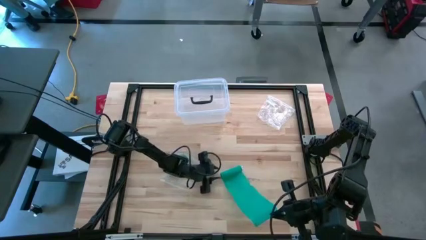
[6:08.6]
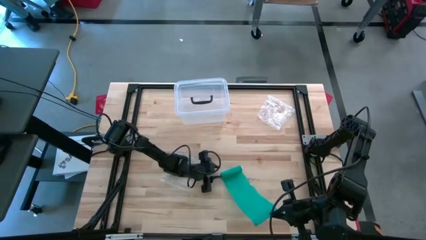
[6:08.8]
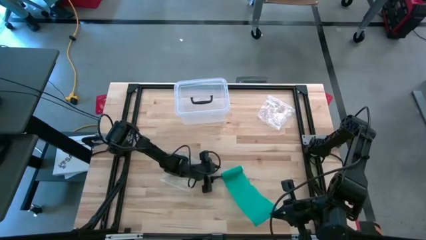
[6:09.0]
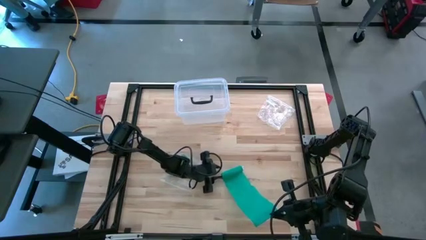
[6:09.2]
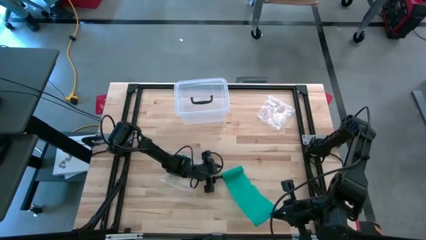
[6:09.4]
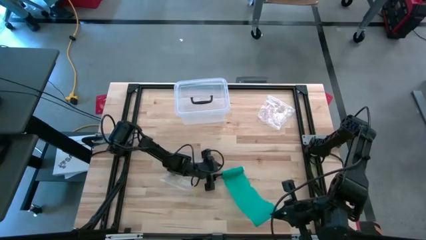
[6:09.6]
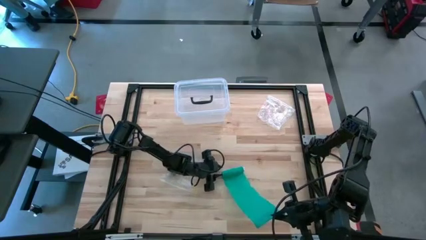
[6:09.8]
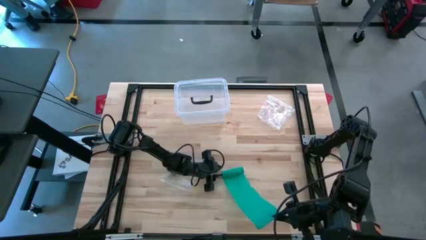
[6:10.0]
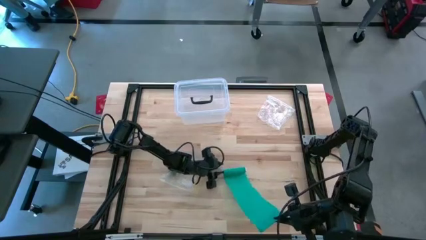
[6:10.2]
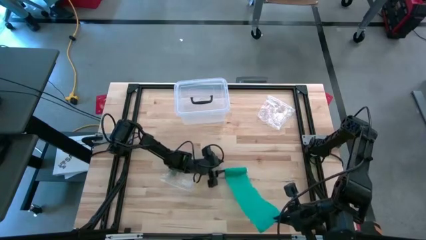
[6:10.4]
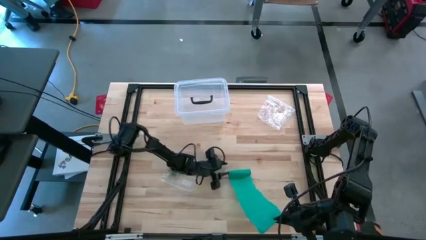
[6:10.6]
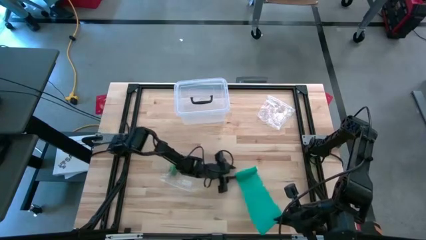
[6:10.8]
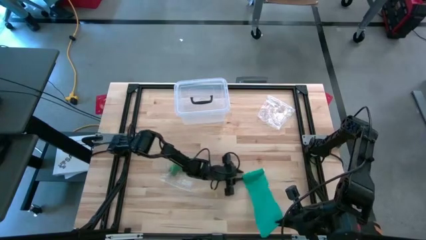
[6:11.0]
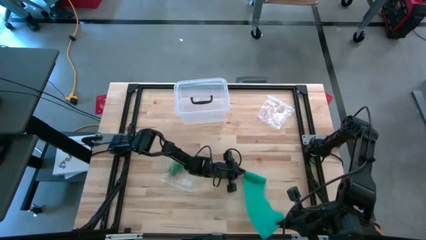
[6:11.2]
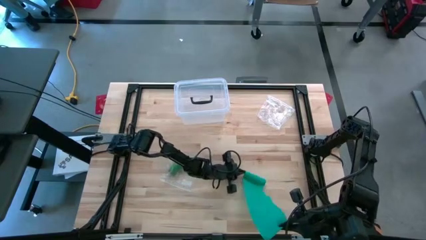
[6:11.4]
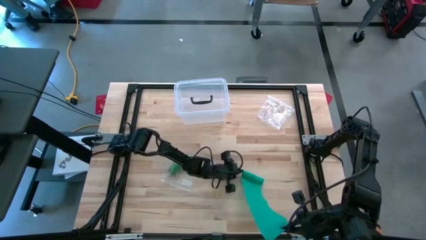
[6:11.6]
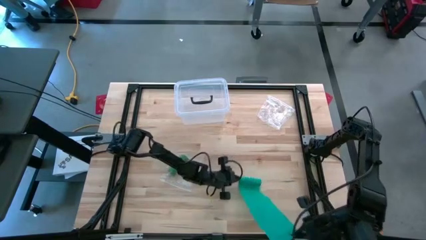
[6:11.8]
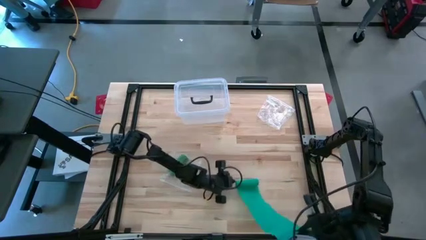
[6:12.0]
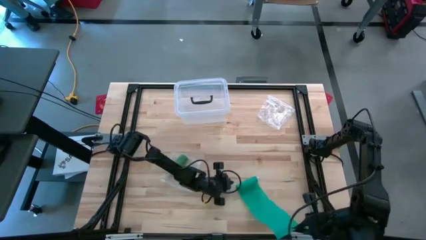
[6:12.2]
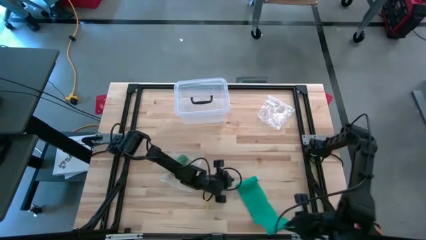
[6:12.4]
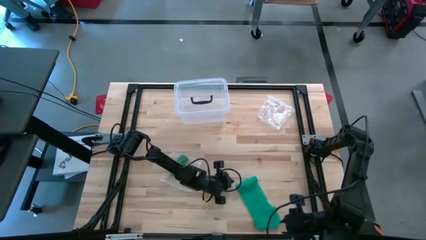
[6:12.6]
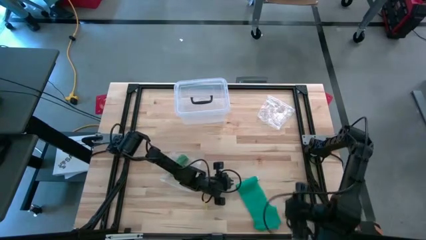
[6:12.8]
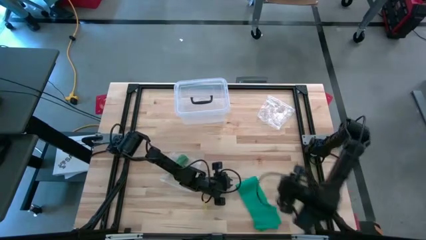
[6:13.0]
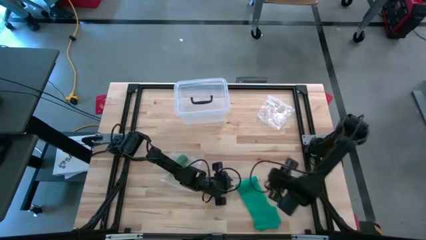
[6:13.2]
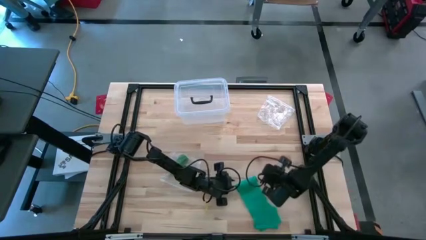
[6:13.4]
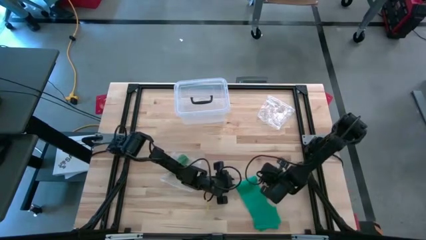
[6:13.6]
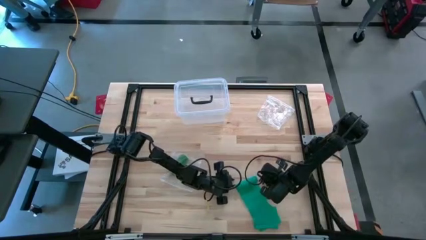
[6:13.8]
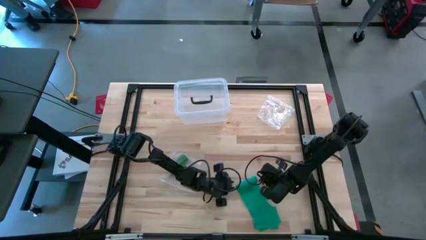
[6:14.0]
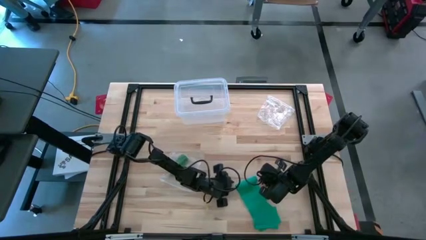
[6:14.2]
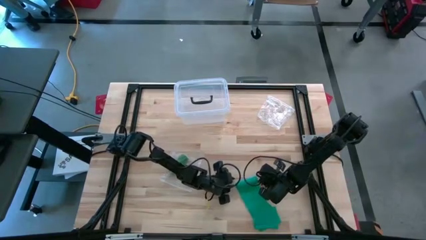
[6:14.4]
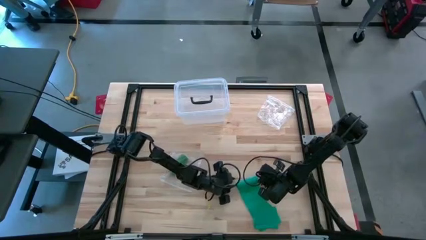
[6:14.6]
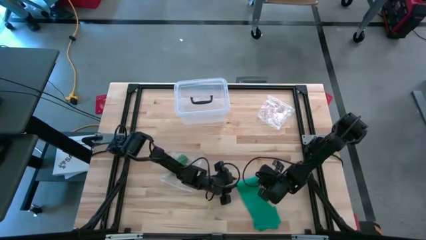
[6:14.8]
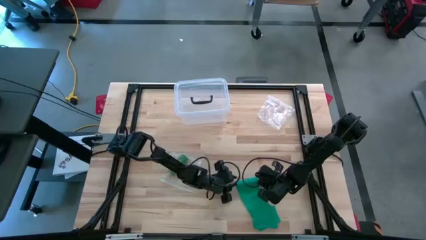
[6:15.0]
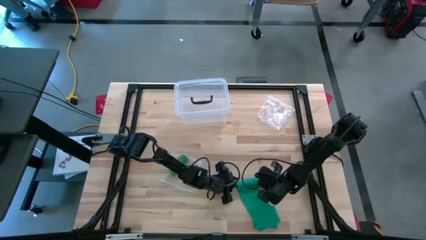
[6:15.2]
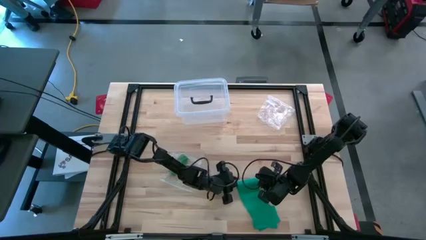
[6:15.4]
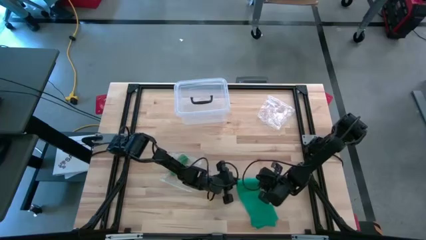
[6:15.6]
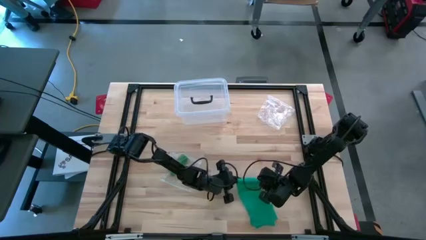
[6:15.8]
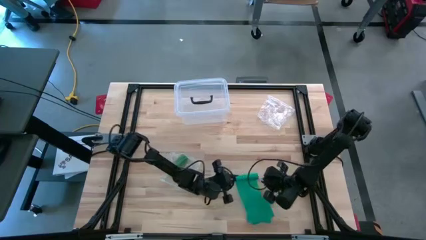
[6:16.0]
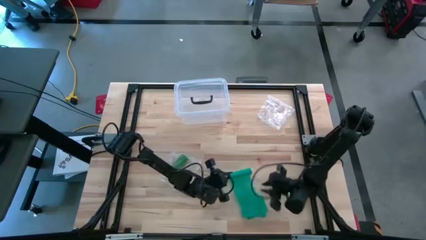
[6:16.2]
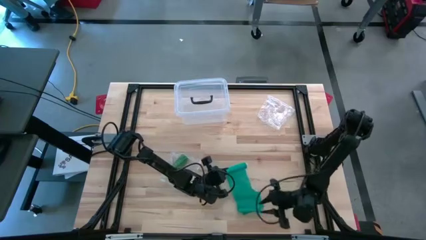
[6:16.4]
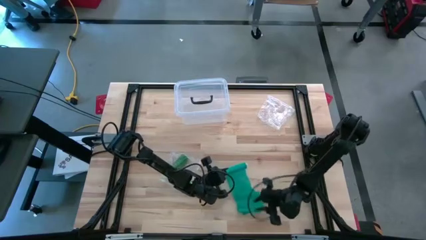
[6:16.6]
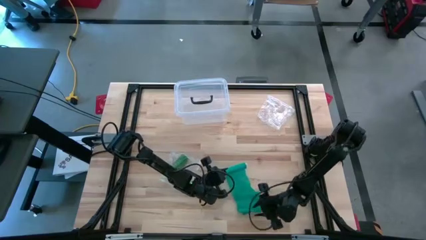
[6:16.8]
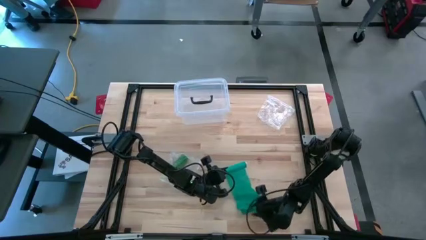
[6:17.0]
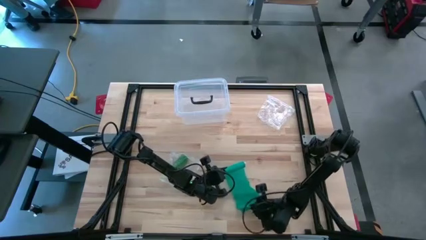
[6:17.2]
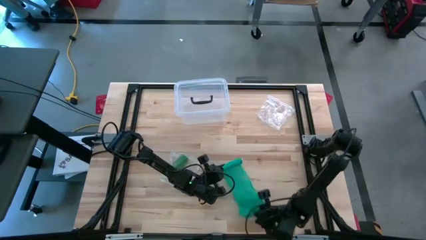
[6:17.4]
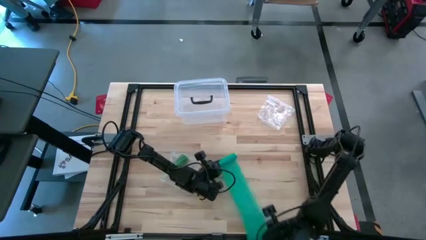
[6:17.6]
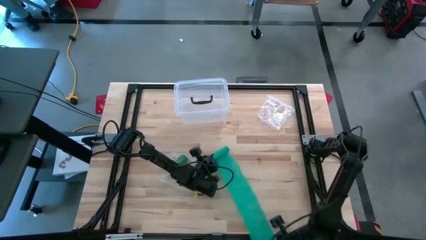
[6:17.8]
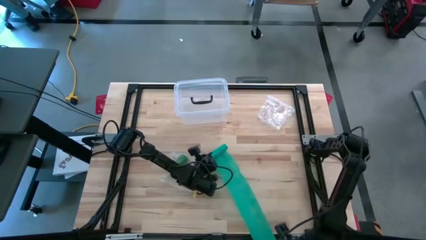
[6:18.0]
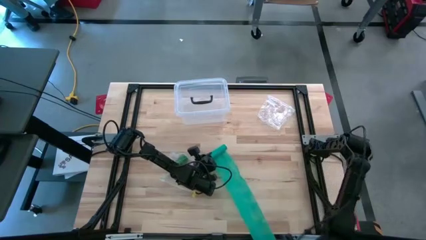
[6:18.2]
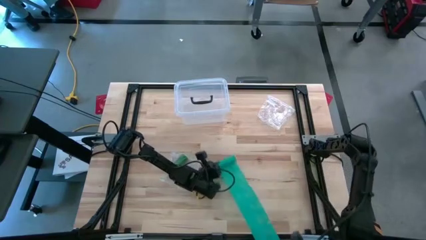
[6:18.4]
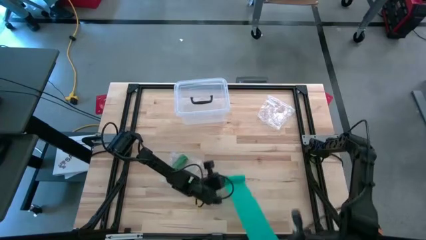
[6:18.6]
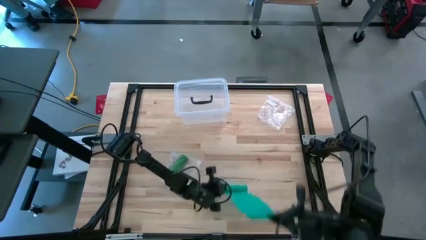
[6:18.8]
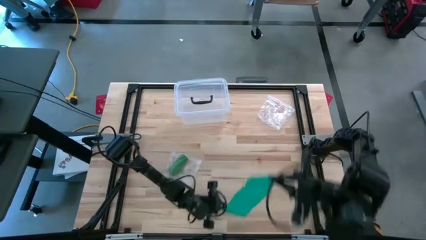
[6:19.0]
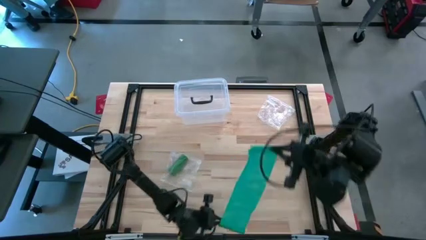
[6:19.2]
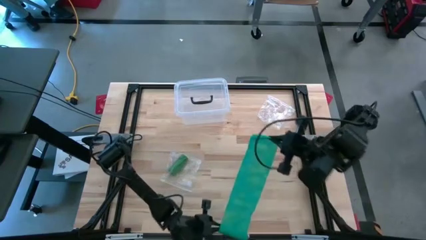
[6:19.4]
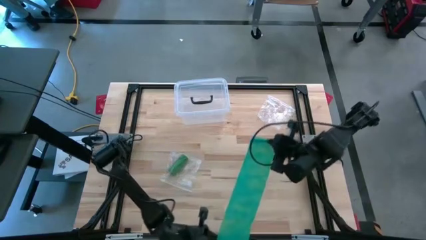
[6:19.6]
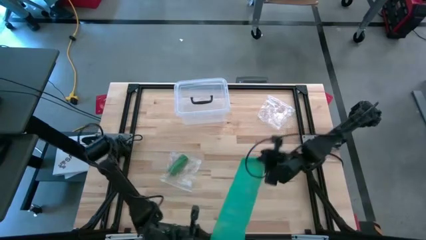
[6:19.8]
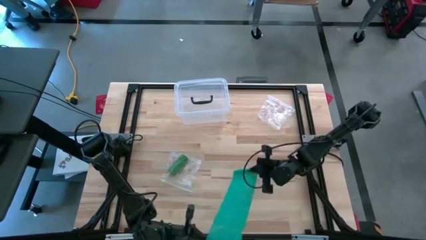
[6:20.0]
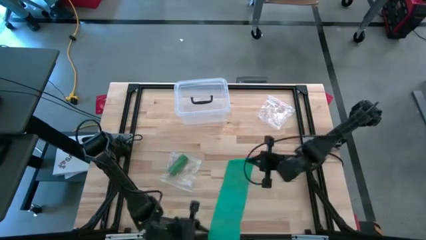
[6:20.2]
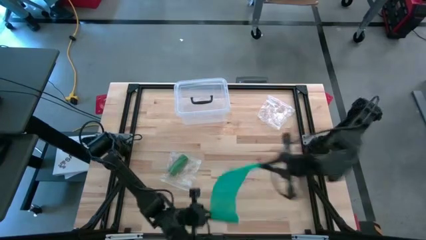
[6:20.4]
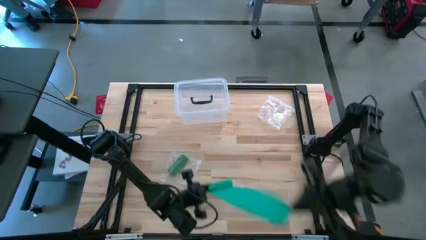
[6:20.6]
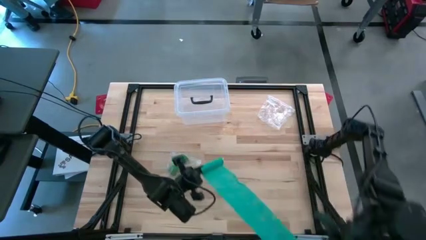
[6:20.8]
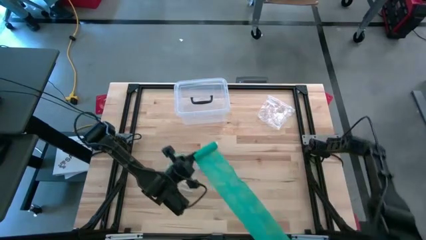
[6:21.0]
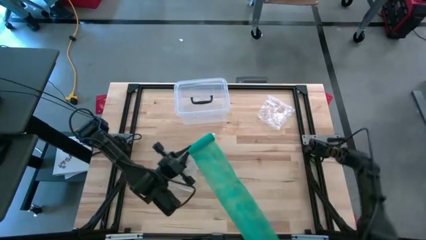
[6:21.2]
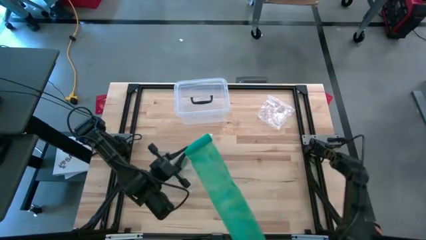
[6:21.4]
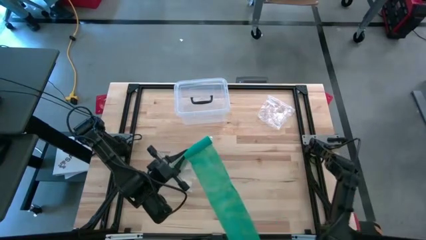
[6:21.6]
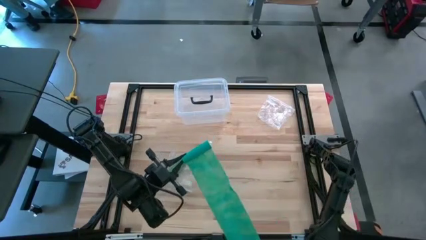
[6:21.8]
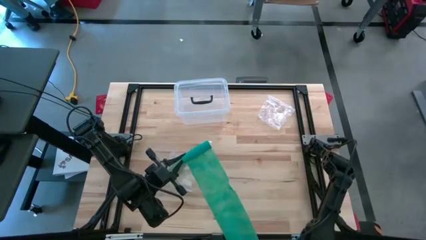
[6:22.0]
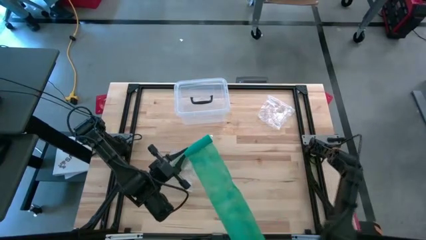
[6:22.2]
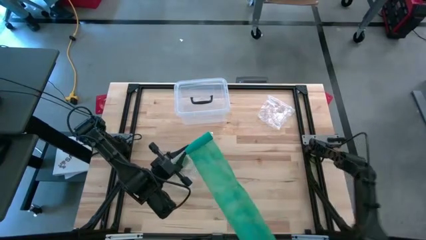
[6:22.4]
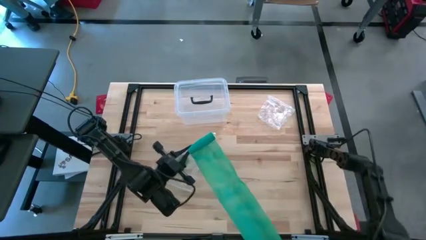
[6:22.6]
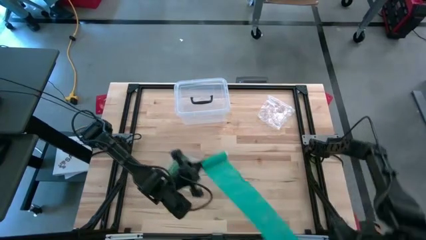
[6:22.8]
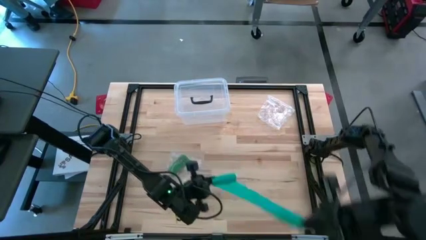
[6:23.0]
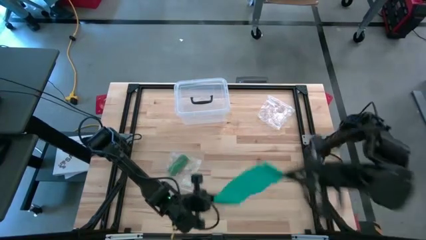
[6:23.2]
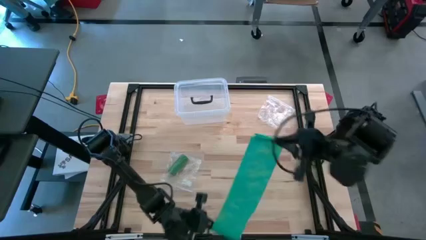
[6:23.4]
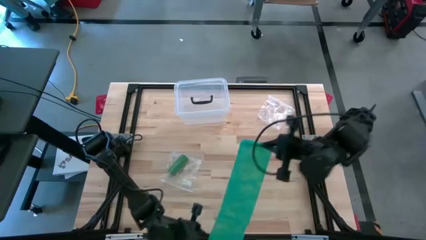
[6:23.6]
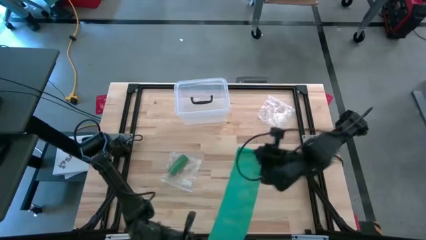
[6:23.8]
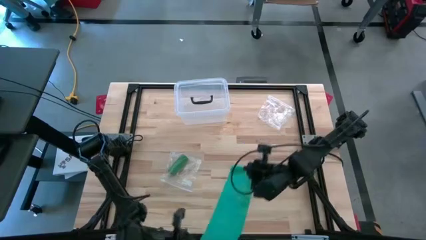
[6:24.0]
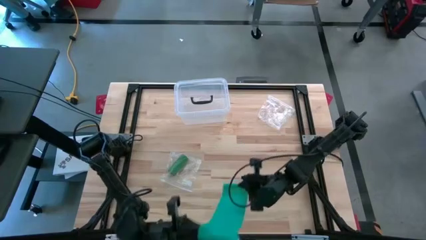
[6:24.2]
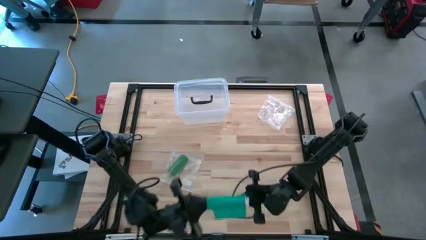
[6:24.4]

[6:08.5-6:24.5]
Task: Roll bandage
Roll the dark green bandage
